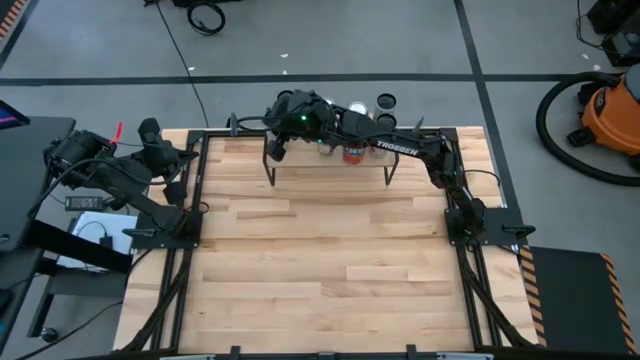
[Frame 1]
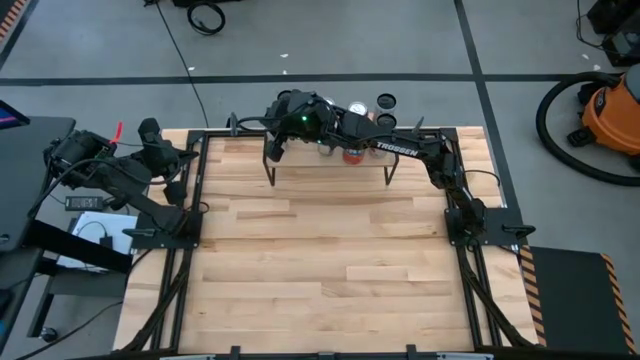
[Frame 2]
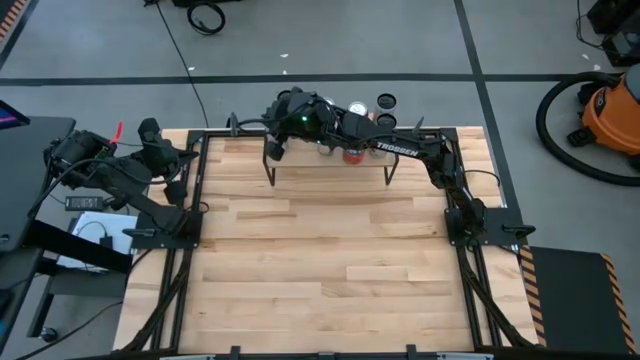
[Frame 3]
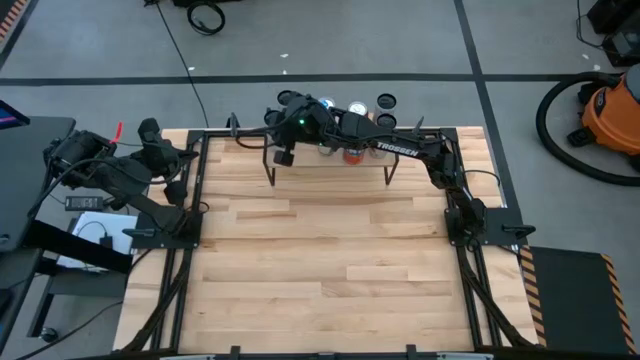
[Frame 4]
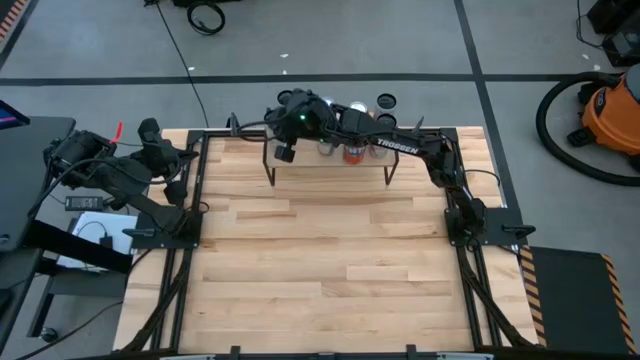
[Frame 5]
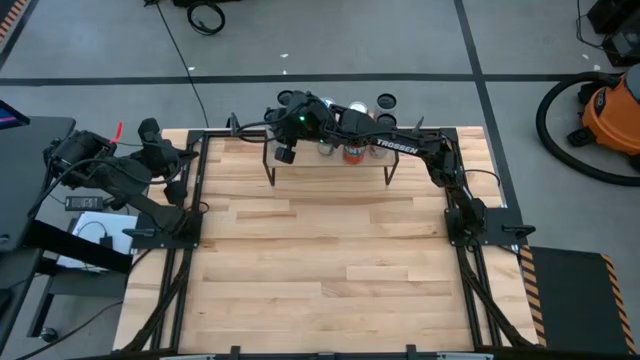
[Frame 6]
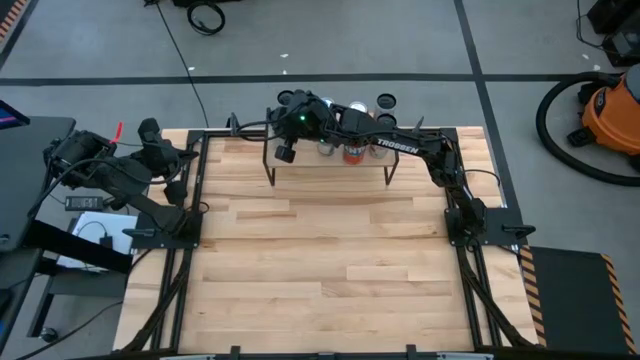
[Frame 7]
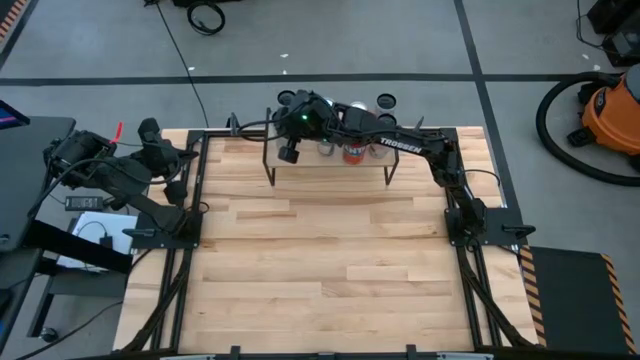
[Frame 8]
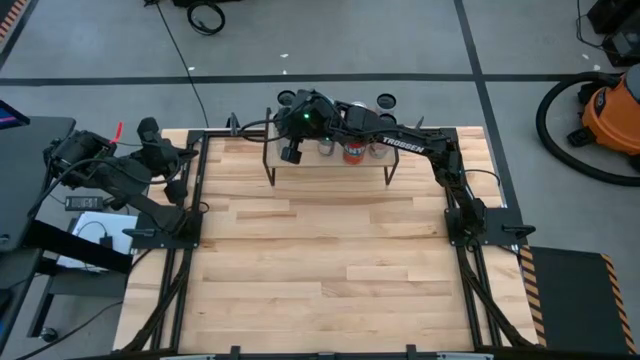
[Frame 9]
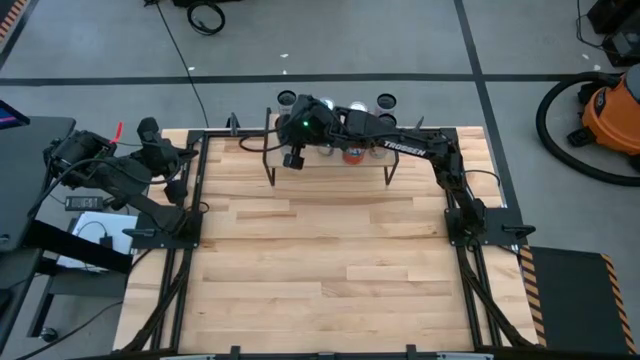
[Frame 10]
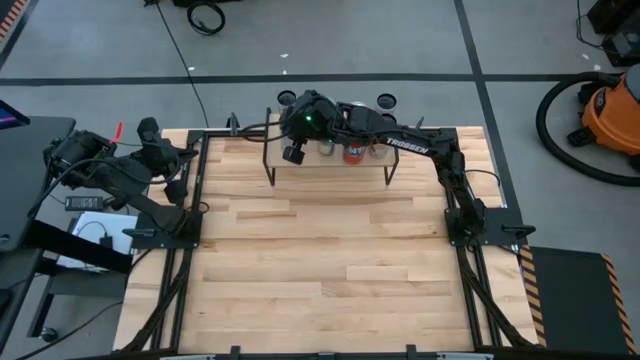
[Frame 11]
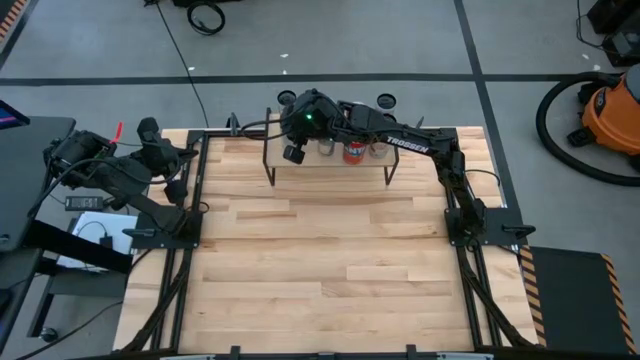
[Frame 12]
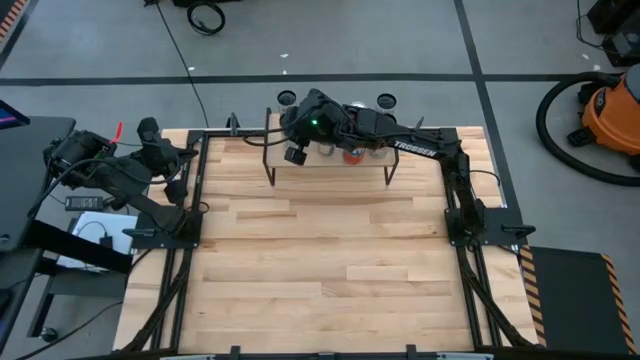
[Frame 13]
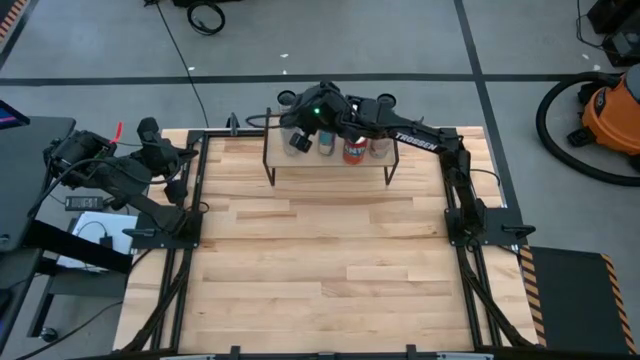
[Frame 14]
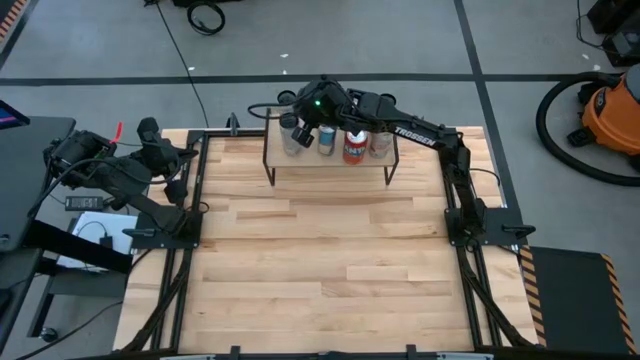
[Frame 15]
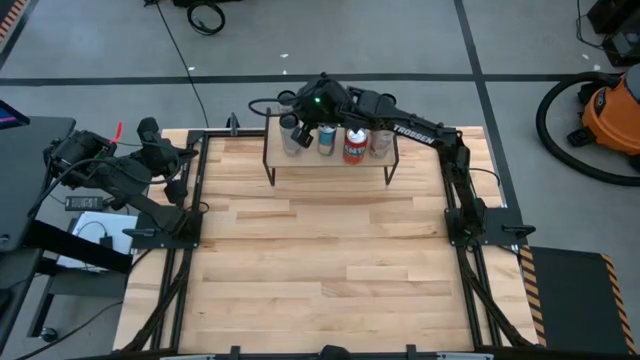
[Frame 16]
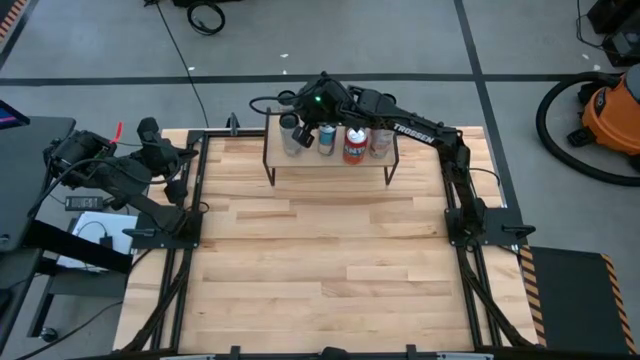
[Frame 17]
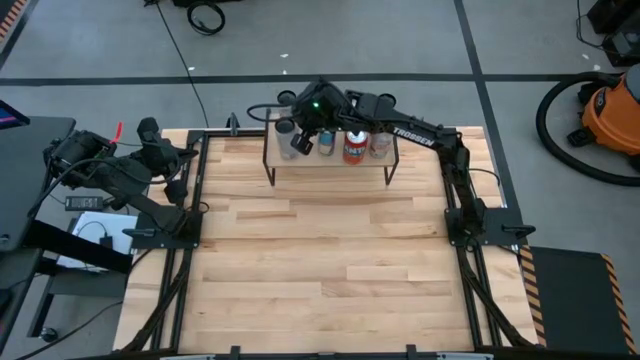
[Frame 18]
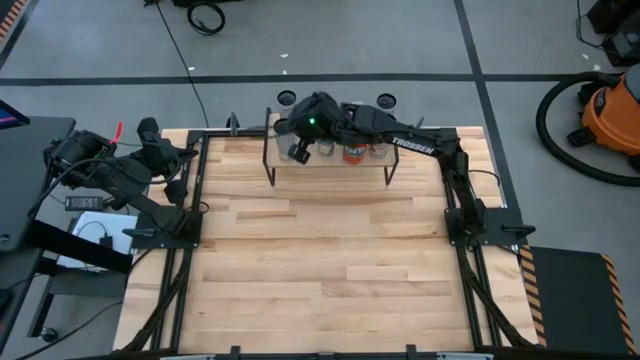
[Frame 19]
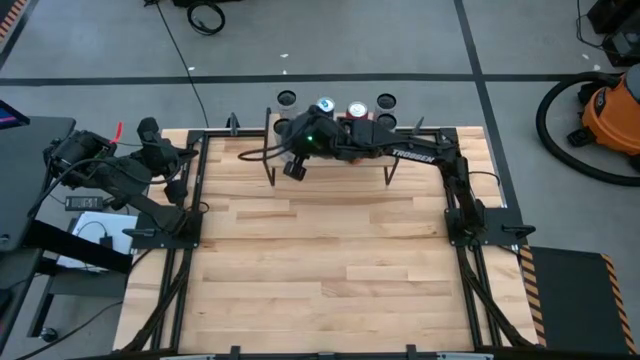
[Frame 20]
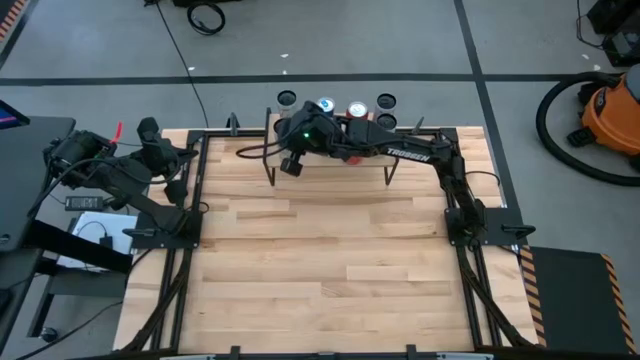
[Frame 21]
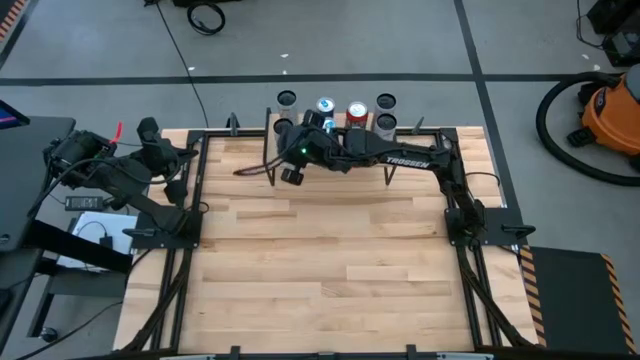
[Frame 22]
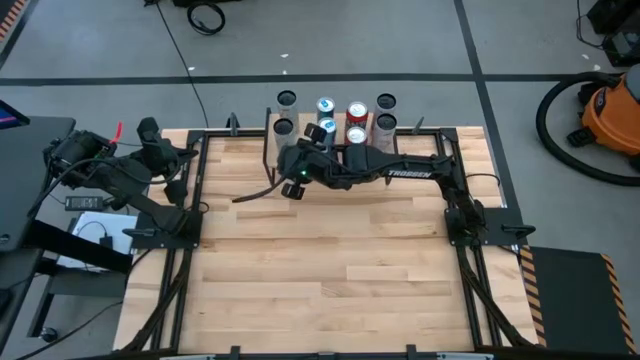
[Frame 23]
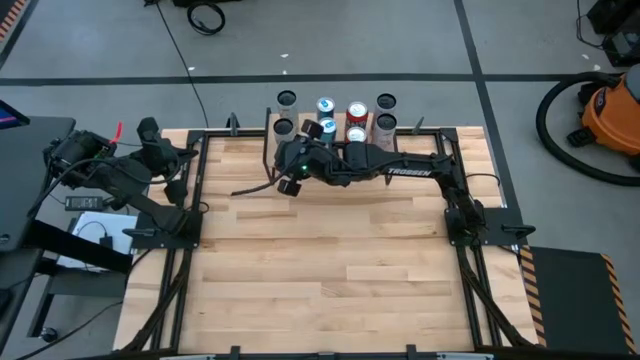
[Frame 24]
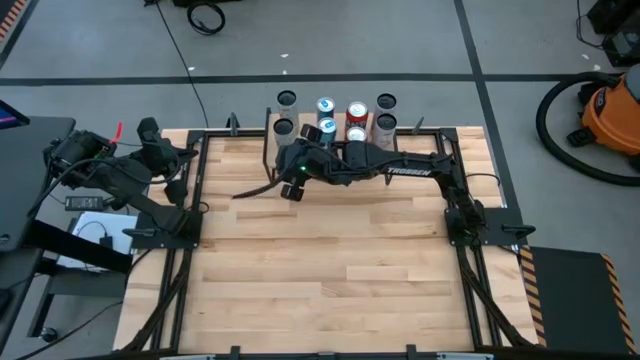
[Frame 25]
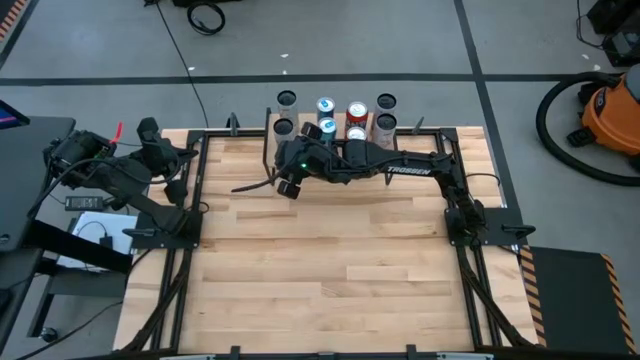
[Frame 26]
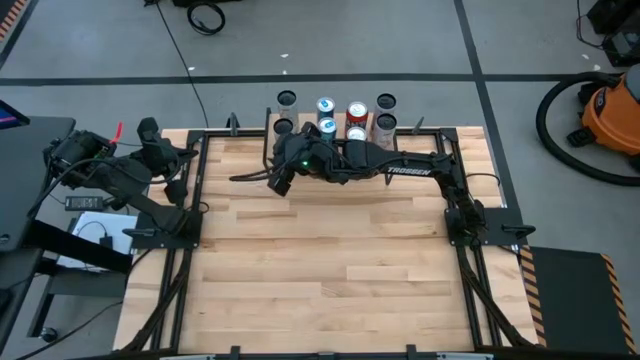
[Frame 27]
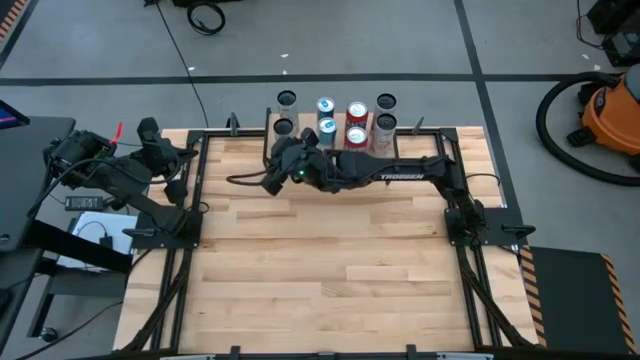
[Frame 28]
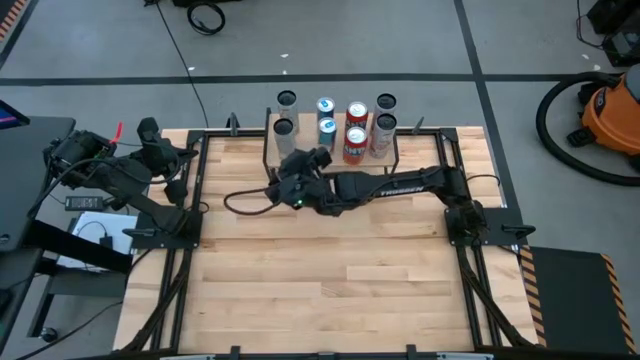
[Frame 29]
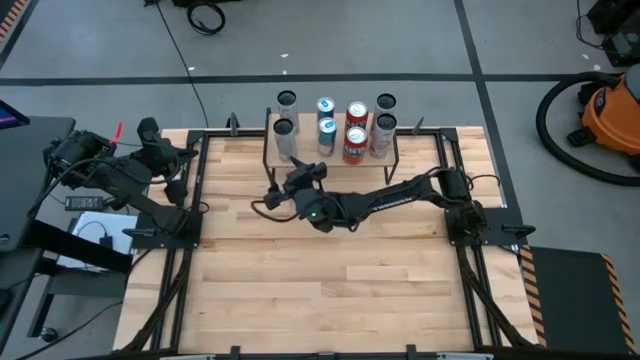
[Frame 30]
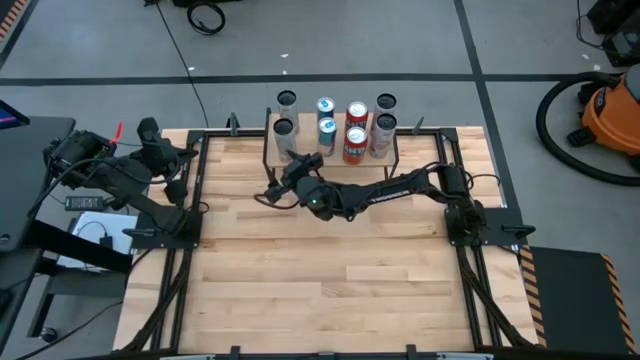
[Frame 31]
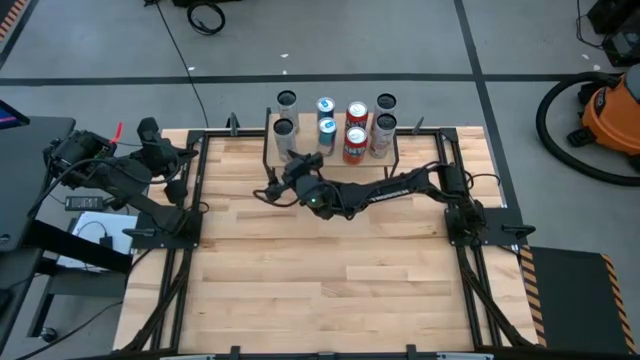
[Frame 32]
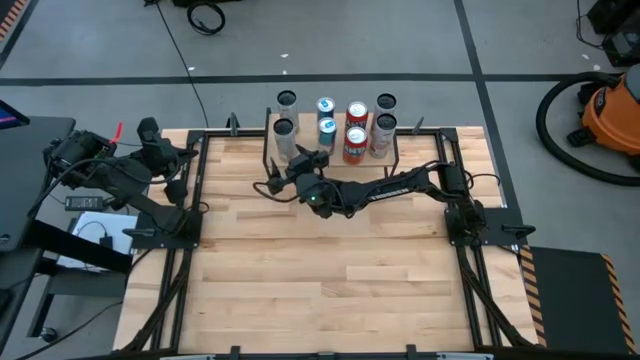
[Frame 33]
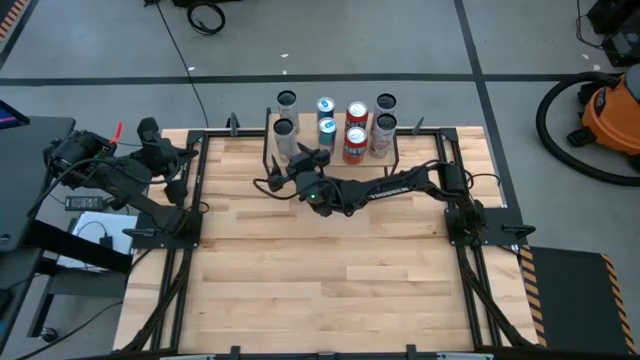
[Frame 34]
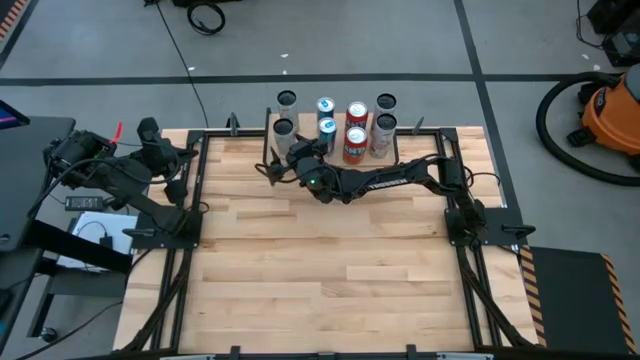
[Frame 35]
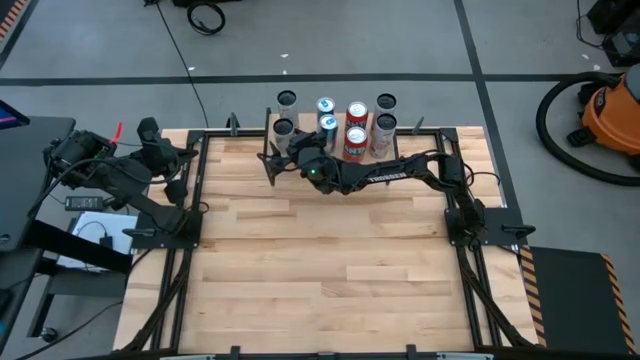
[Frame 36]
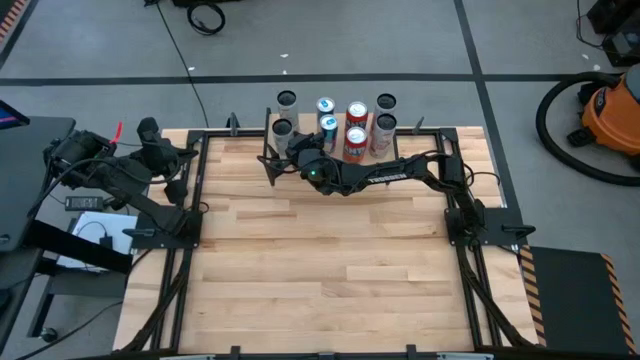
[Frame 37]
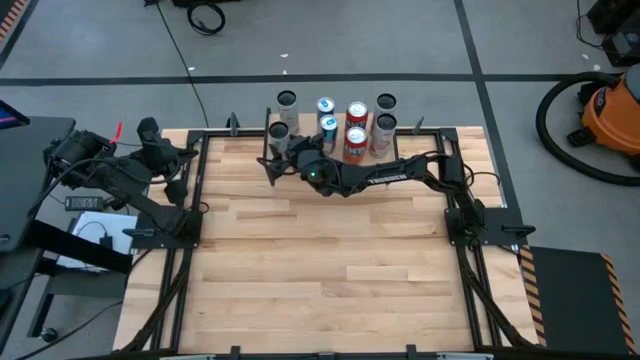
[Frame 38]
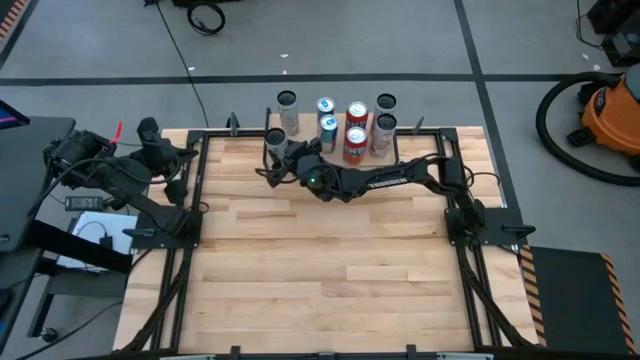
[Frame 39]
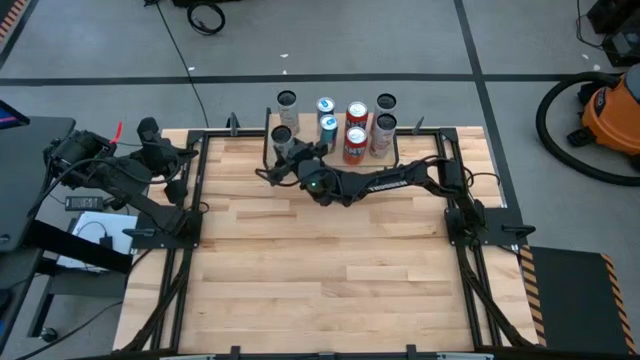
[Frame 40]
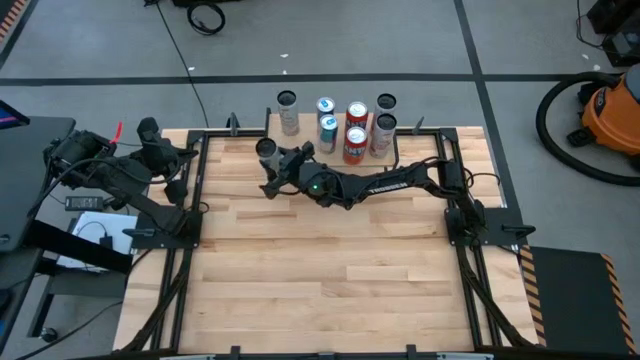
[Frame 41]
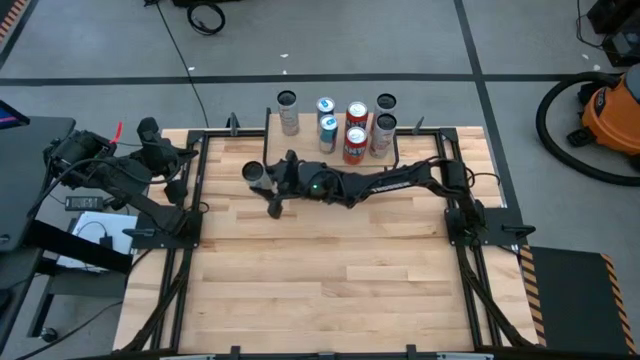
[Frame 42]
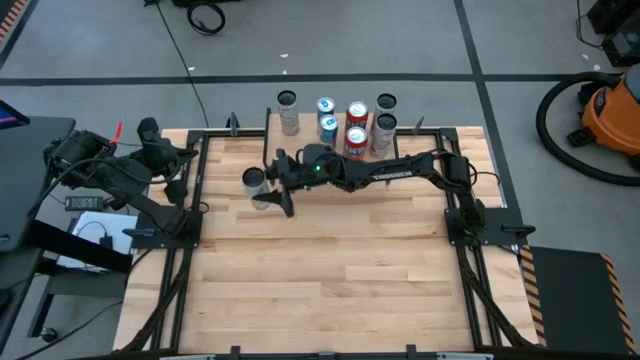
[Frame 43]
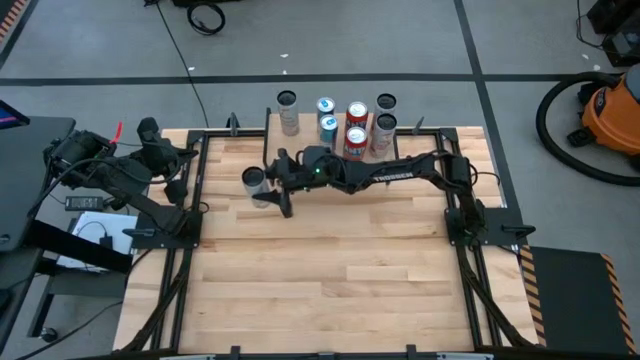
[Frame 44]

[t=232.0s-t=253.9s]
Task: Place canned beverage on shelf
Adjust the soda cans on the shelf
